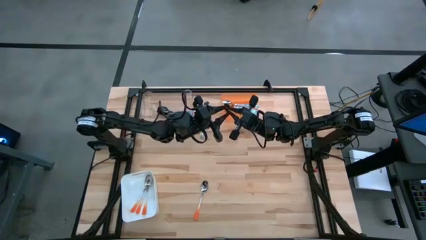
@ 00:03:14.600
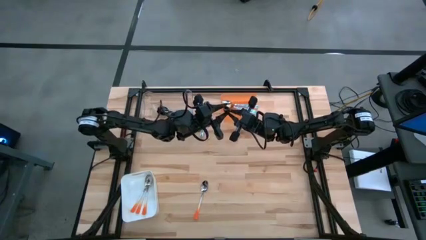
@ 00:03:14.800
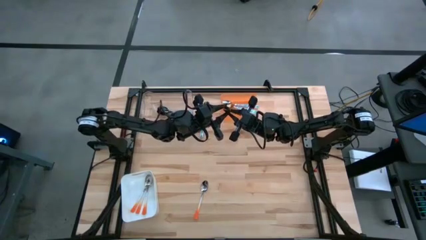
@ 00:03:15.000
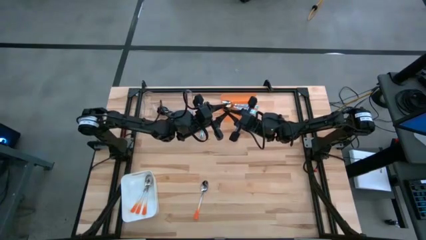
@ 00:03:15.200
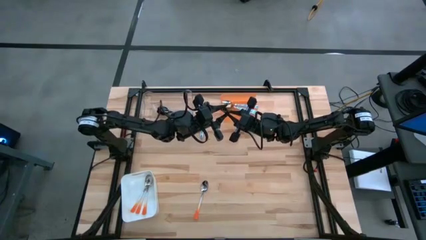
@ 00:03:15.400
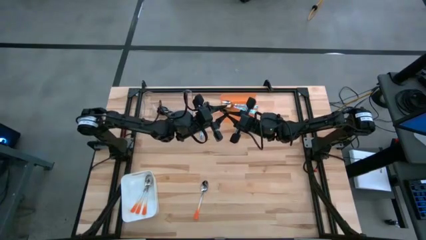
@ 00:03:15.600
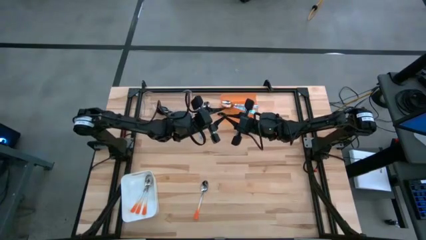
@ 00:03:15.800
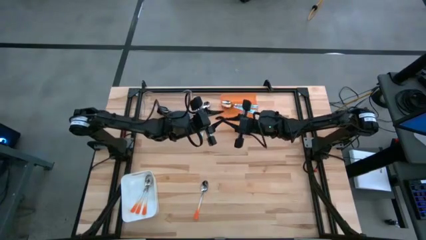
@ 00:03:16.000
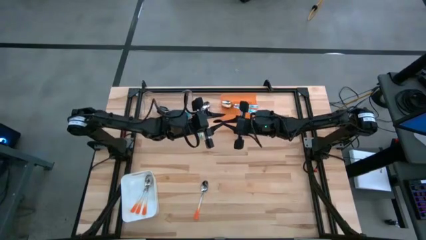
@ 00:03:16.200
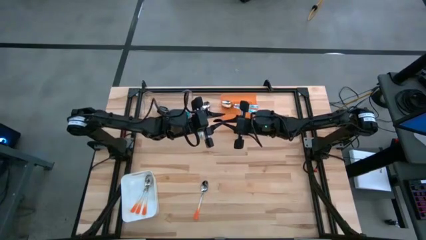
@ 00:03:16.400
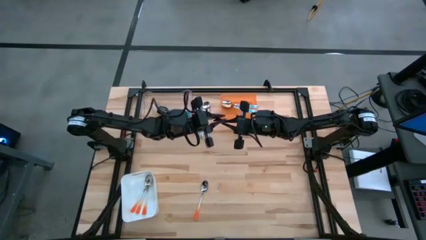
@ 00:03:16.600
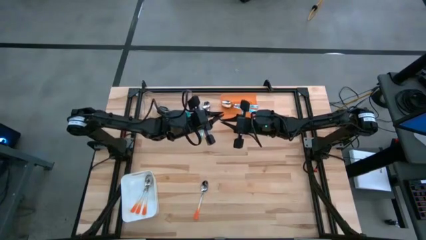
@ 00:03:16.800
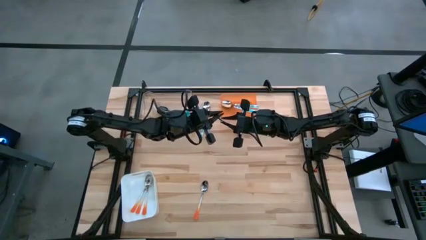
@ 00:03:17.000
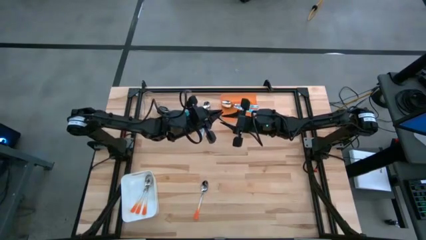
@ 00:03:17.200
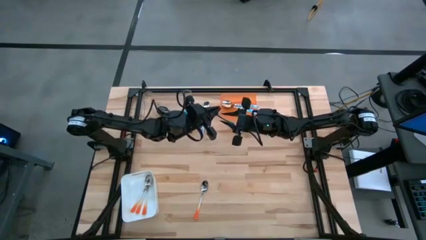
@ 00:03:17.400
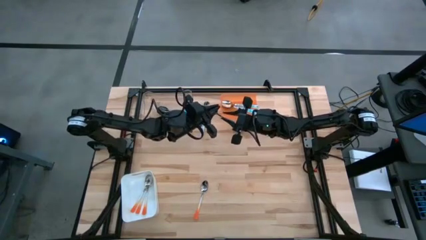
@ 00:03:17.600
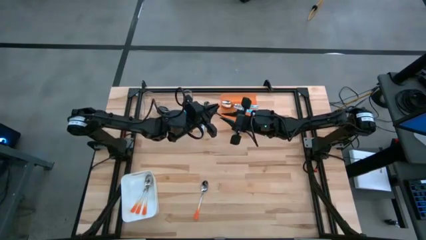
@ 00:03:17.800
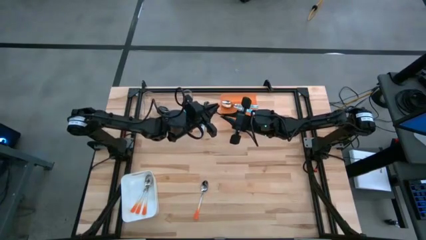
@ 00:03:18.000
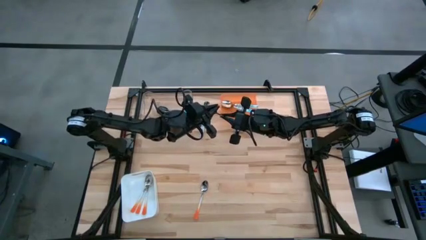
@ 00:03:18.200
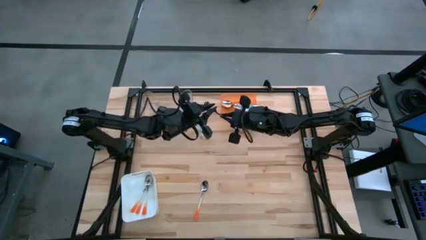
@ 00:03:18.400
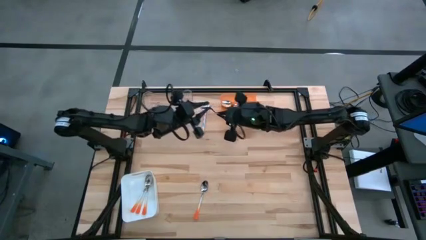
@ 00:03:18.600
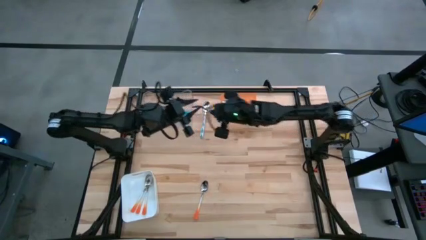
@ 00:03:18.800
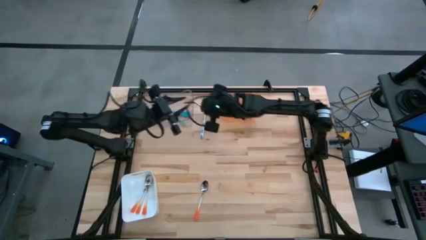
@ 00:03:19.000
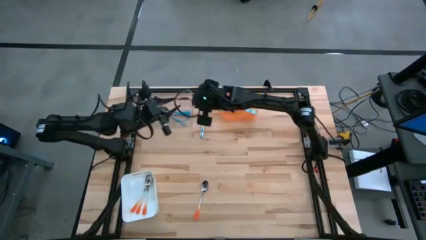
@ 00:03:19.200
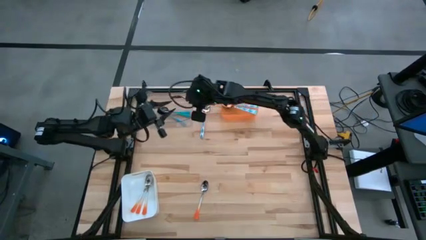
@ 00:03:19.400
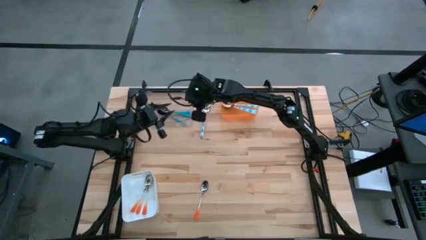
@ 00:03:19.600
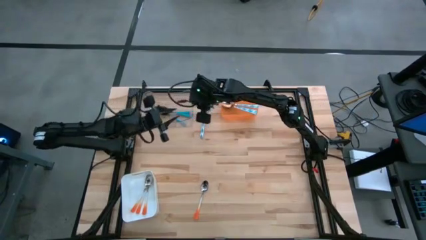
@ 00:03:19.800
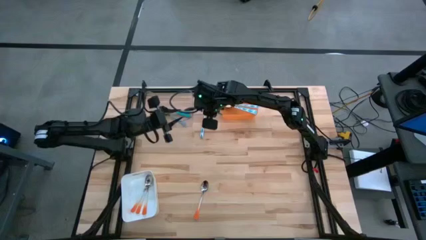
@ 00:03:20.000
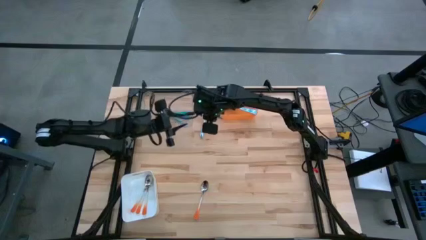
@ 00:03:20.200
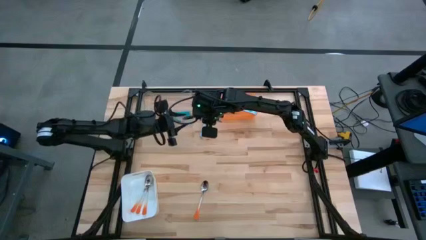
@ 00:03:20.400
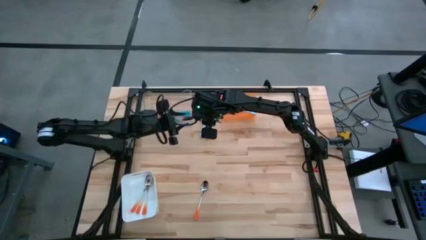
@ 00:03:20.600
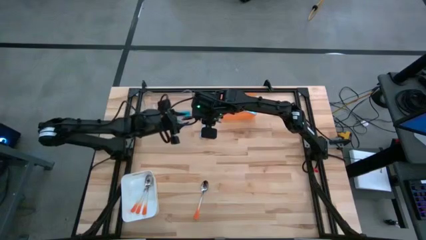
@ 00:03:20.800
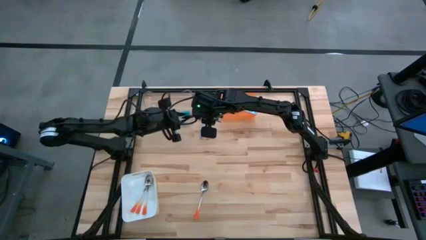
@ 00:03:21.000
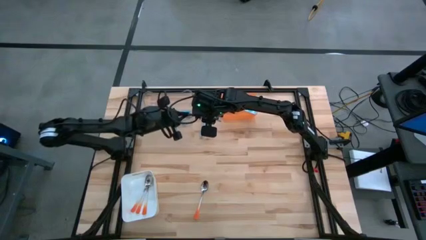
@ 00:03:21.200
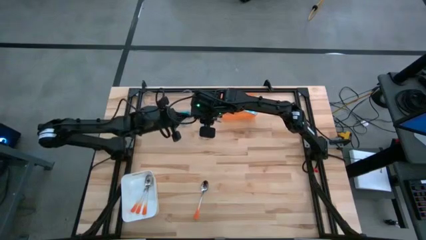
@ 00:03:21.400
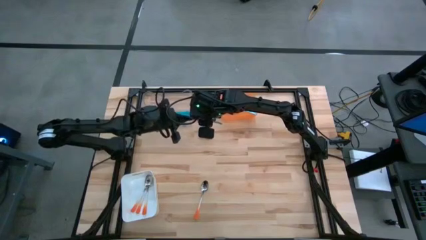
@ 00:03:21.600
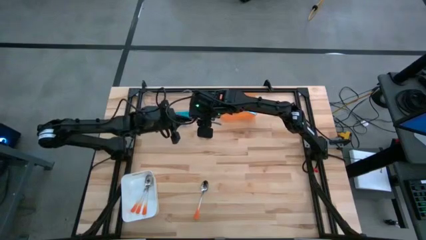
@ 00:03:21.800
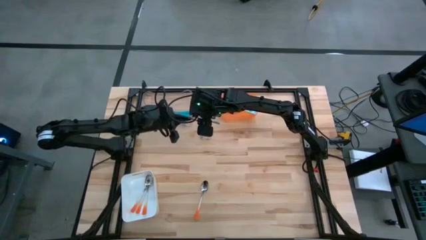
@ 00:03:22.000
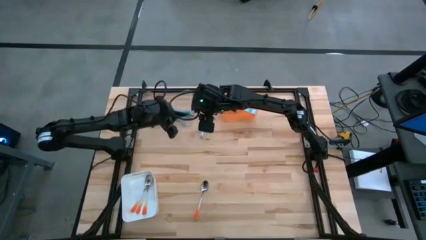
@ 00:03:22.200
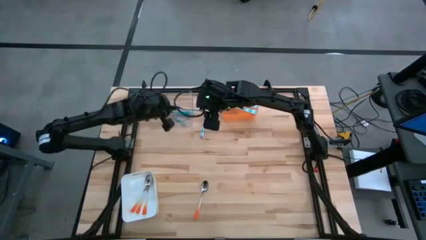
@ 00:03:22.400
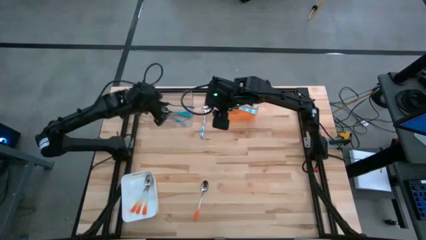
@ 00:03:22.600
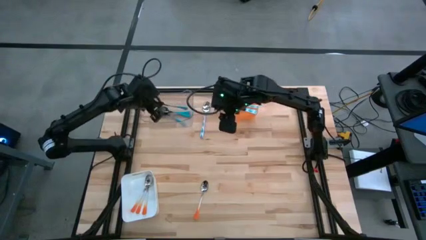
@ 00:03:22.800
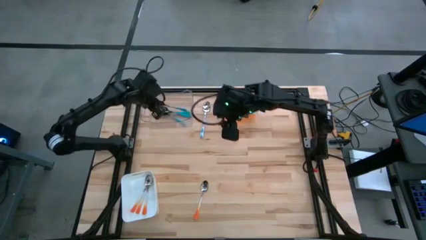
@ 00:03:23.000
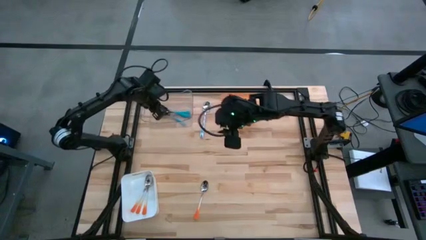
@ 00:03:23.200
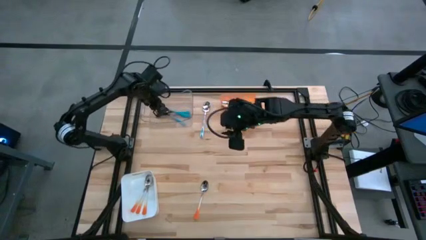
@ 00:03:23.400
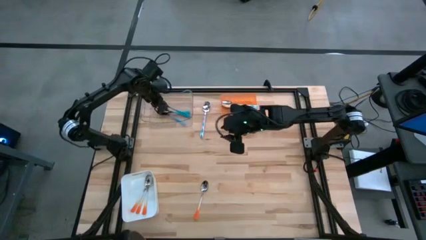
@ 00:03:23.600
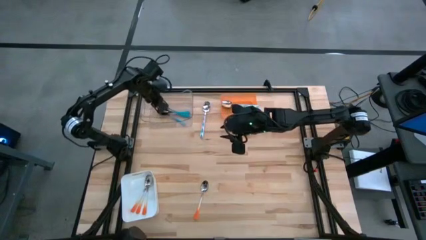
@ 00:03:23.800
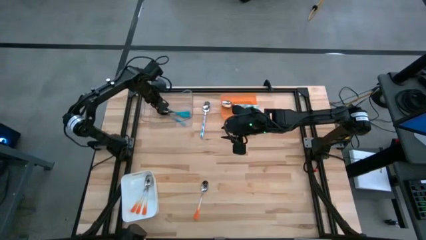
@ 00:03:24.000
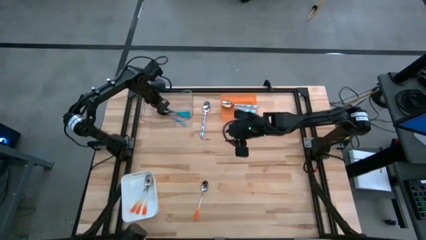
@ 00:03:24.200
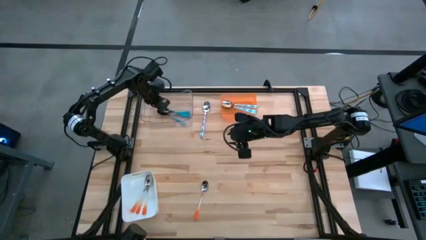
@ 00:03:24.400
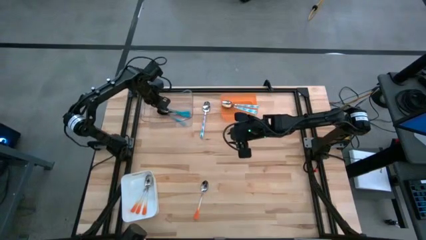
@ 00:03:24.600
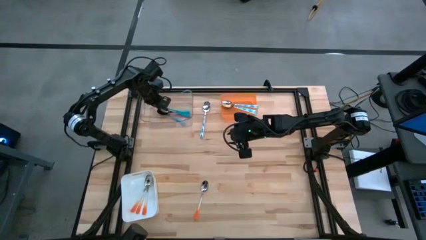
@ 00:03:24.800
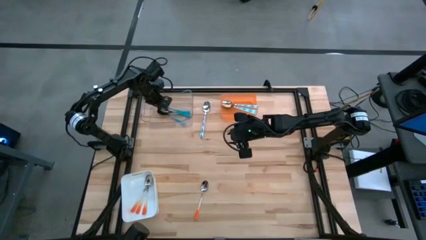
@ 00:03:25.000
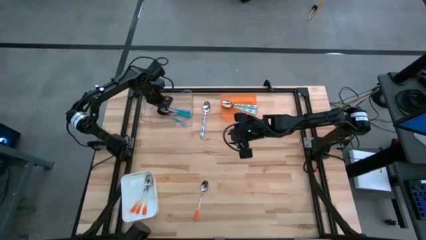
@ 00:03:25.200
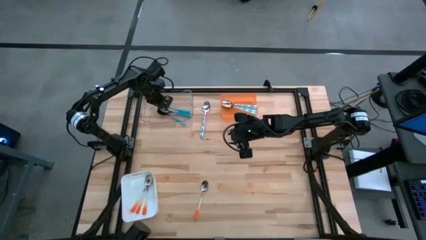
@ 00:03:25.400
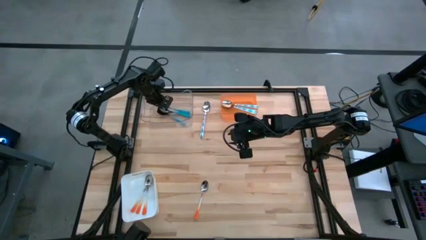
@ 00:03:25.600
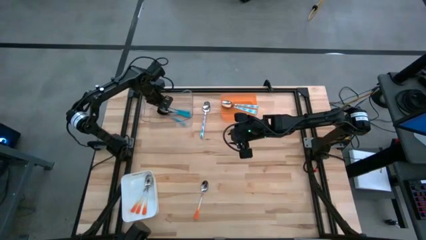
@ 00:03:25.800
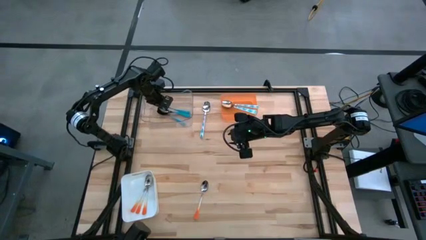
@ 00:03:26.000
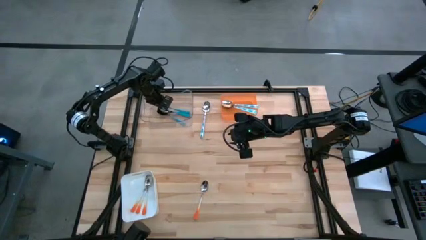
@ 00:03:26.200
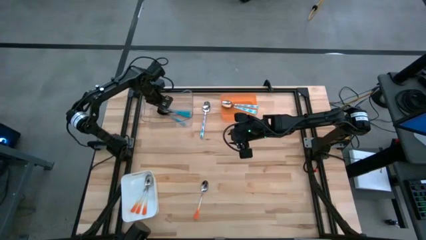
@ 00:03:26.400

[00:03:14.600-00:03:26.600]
Task: Sort silverware by color (type)
Put the blue spoon into the transparent bin

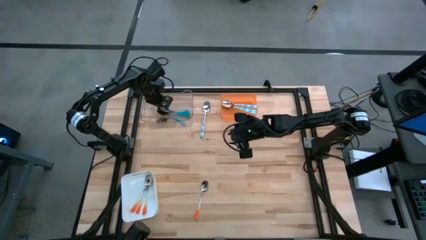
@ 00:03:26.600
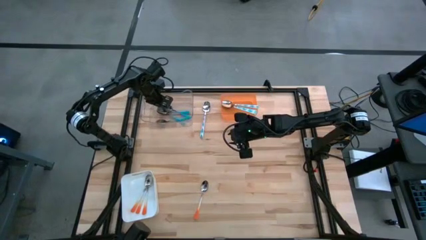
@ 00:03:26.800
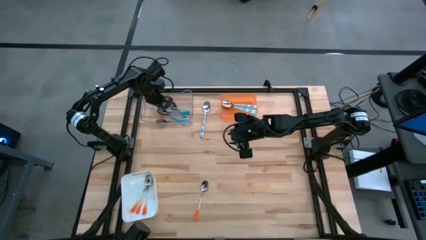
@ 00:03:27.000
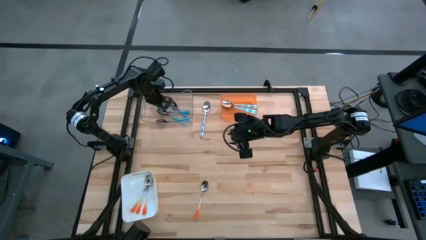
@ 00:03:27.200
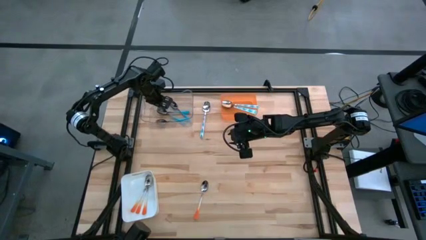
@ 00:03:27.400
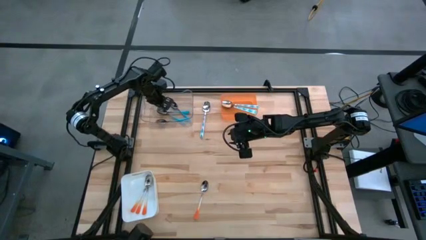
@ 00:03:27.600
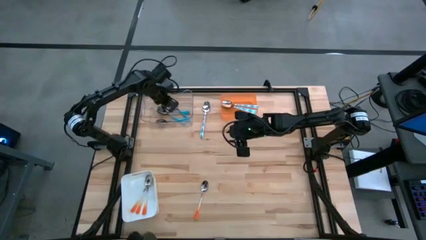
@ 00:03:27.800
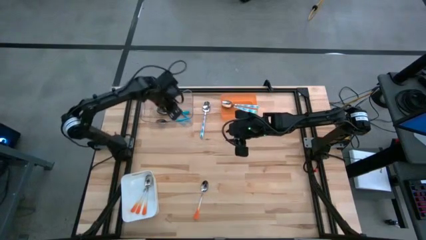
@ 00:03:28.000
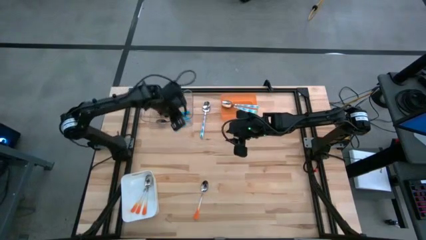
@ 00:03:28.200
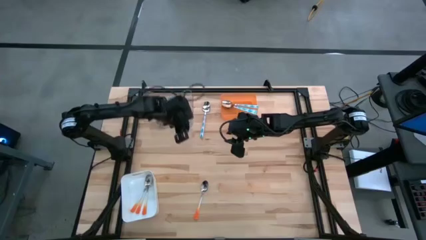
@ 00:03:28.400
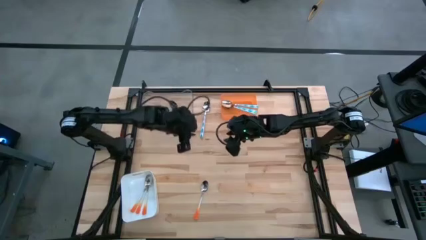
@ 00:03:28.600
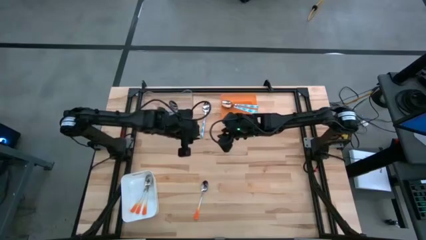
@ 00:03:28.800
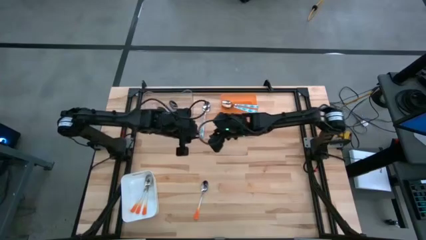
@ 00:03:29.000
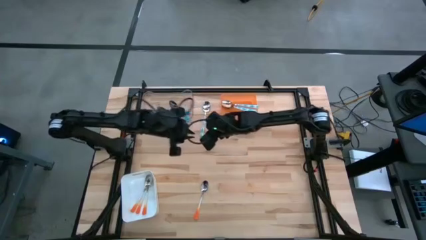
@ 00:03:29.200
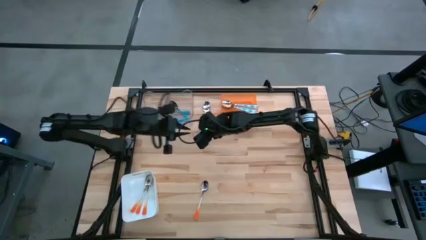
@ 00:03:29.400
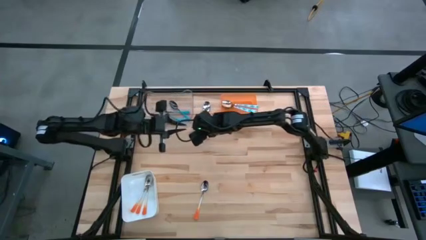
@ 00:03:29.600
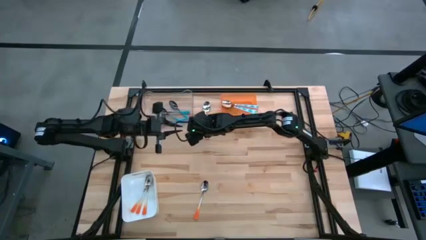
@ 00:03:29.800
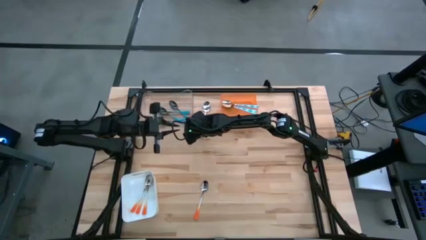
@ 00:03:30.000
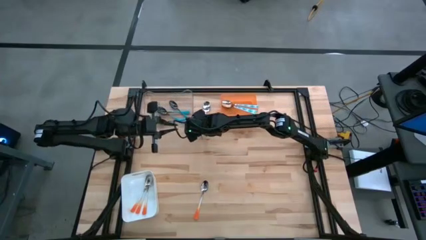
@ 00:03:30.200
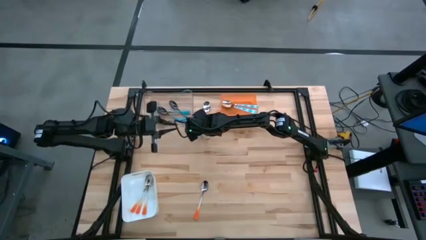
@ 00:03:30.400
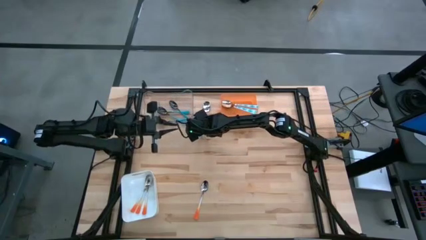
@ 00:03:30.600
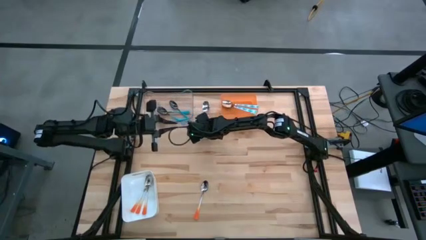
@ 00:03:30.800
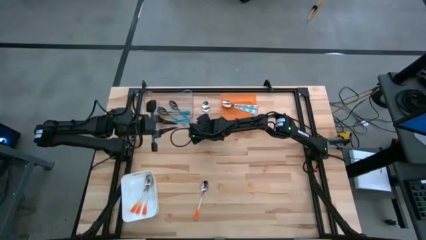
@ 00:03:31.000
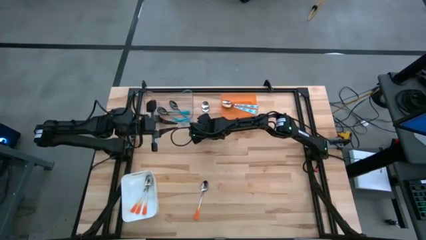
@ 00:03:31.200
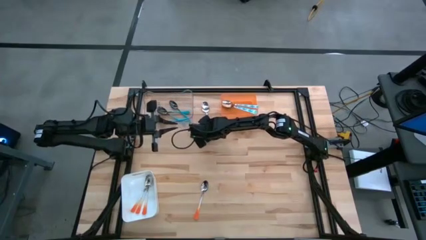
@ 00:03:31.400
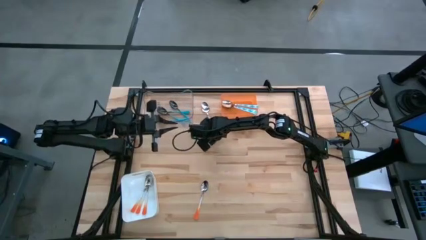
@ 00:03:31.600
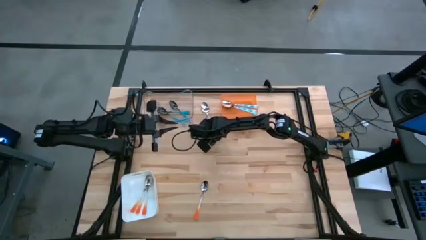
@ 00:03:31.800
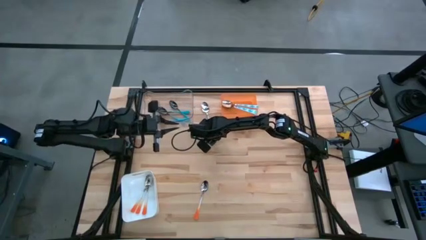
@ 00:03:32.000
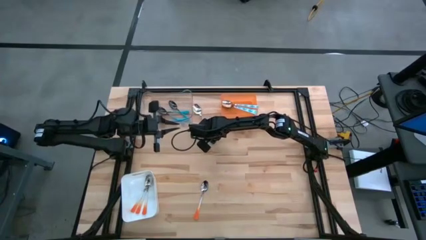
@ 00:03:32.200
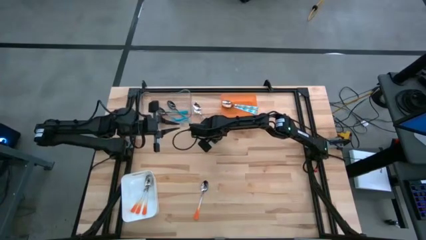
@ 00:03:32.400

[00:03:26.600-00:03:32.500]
Put the light blue spoon into the orange bin
